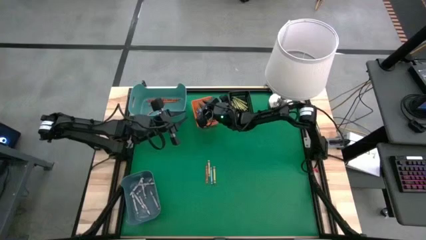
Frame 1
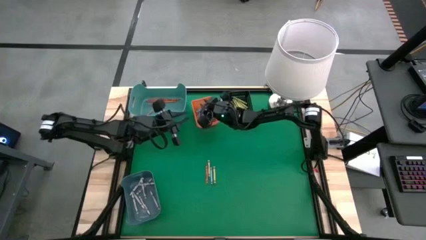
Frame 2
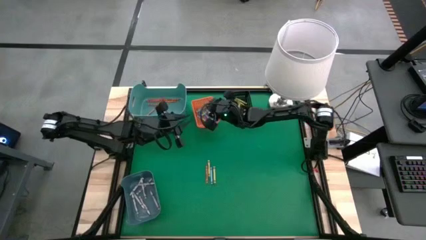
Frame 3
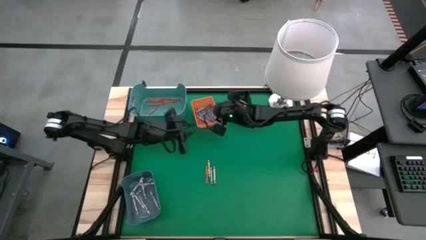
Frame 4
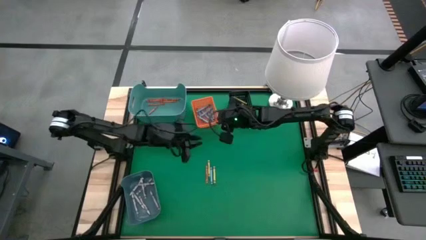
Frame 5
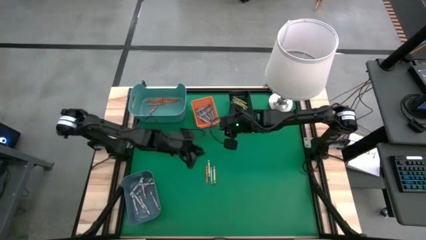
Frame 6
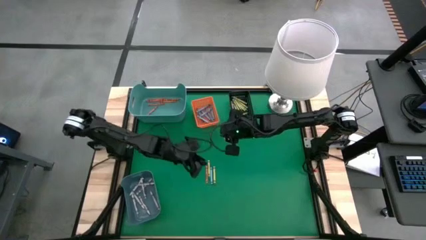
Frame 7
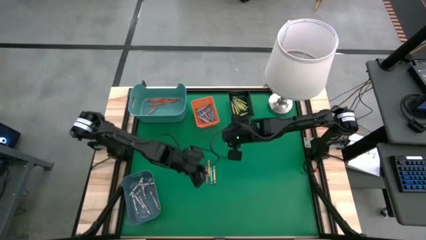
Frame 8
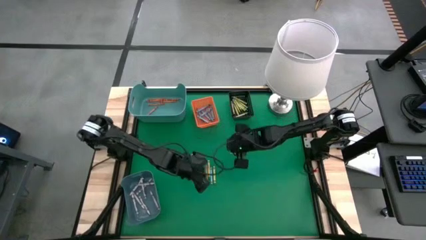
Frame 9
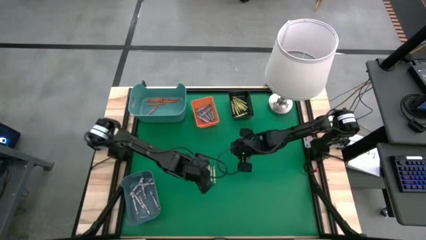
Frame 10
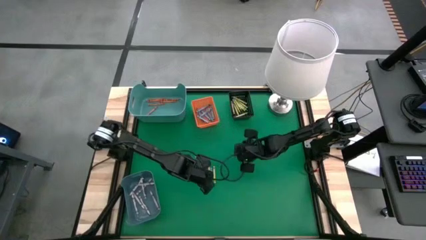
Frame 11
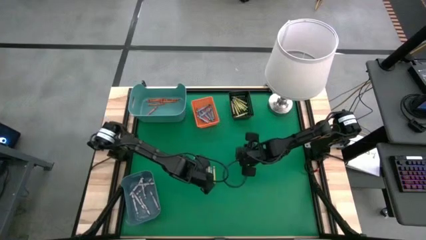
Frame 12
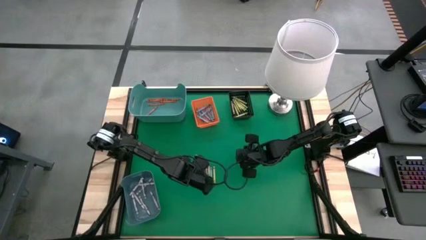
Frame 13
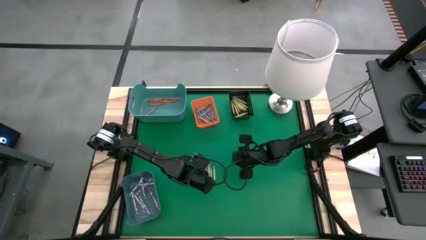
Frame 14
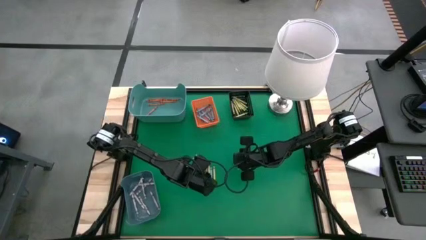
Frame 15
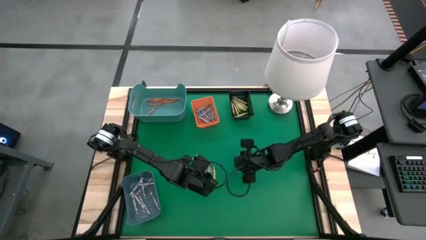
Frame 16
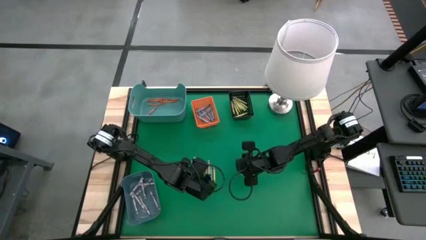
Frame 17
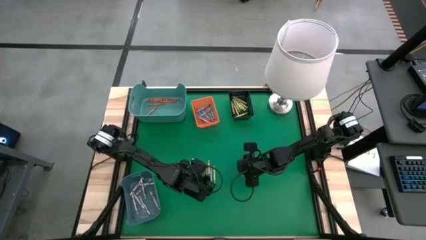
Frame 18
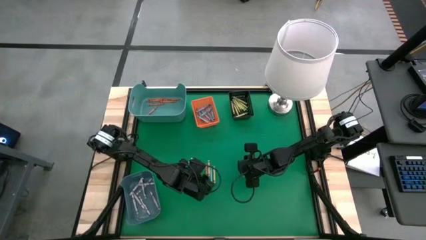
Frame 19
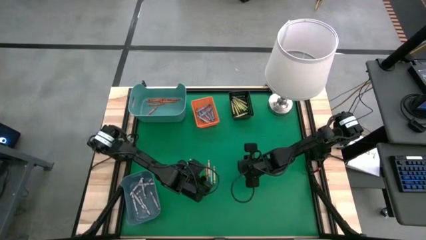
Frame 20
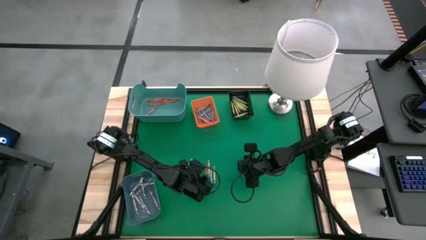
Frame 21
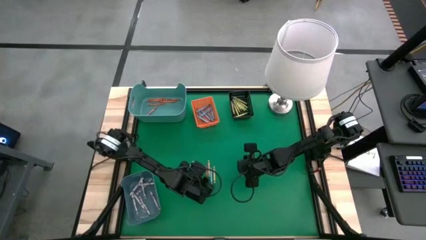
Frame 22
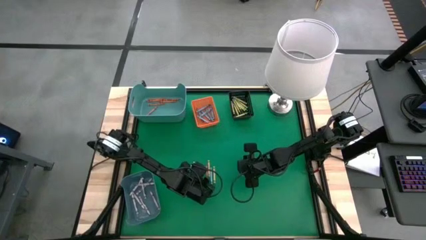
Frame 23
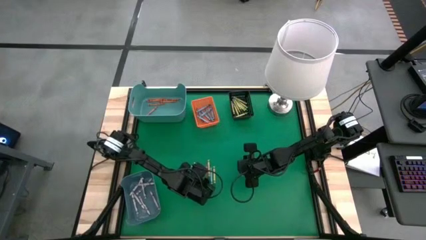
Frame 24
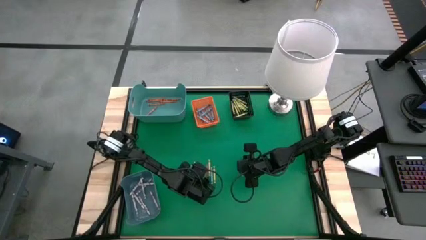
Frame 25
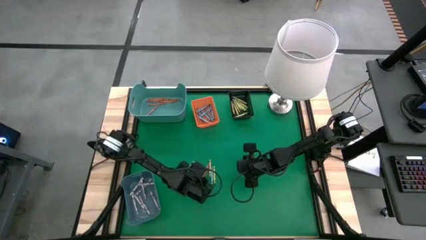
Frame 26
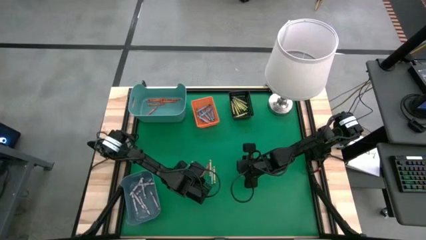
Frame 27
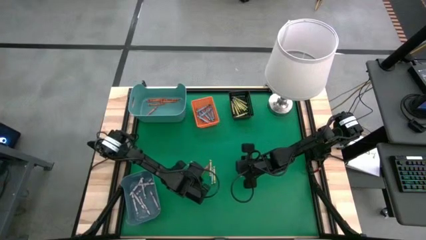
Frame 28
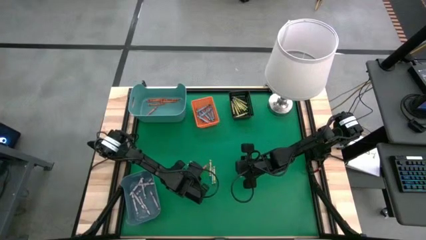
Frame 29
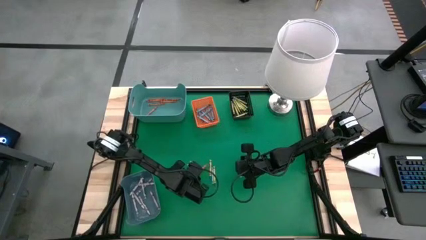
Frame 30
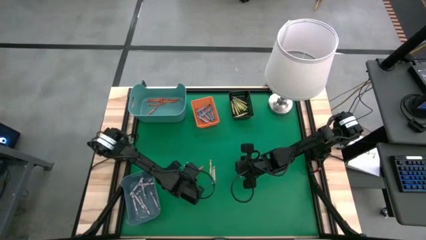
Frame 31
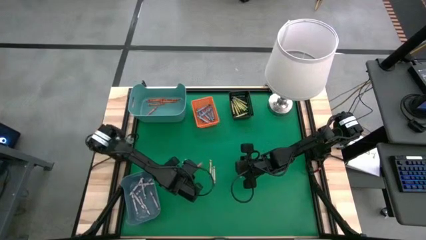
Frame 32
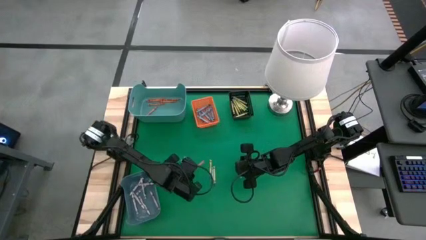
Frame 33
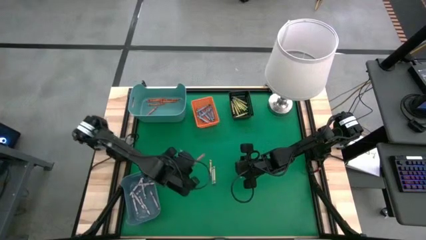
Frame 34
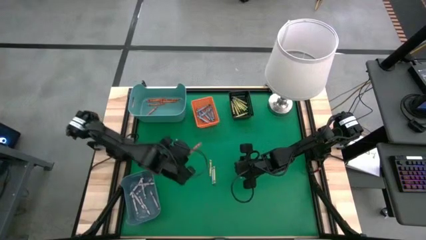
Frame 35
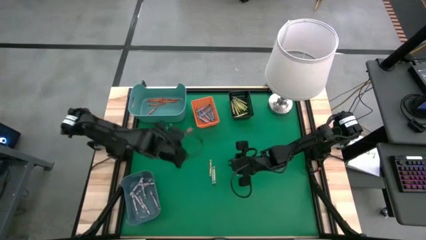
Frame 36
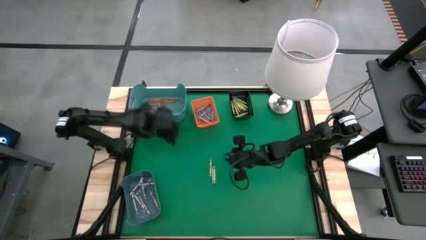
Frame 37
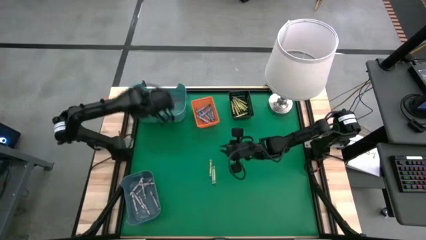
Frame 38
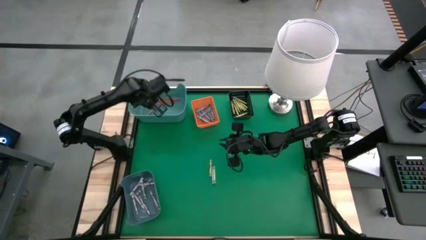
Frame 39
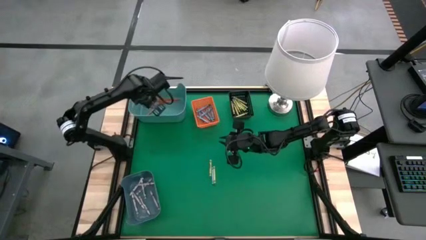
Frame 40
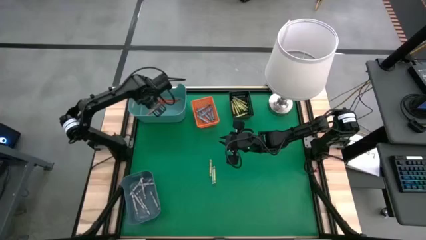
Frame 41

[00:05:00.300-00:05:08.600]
Task: Sort crayons
Put the orange crayon into the green bin

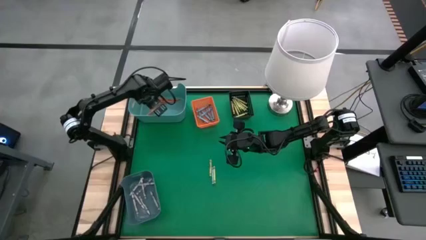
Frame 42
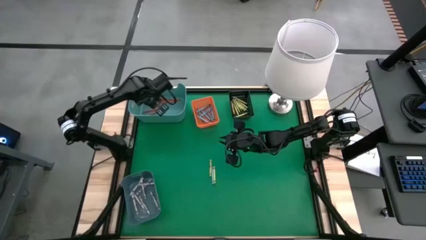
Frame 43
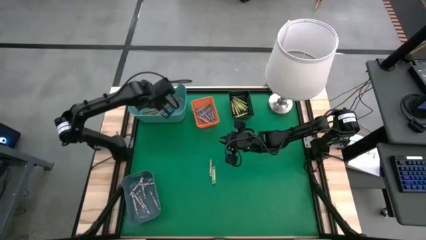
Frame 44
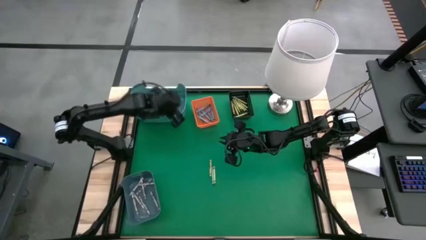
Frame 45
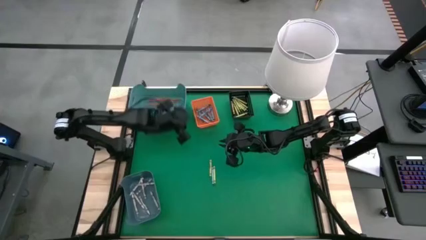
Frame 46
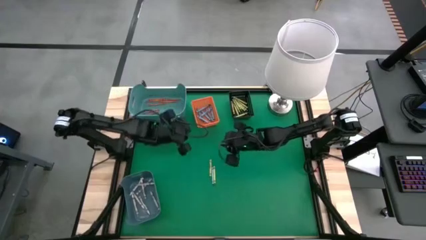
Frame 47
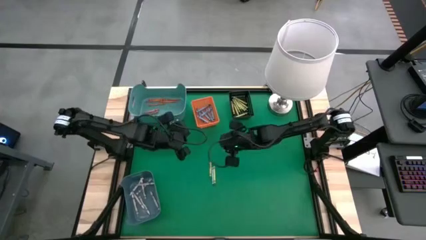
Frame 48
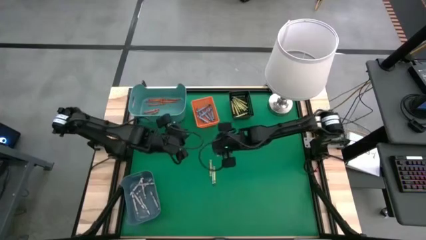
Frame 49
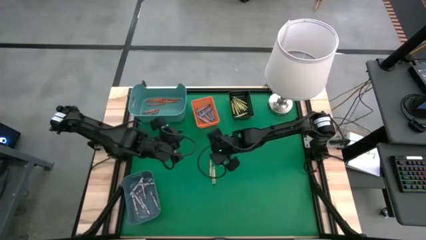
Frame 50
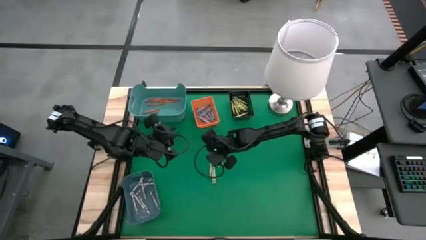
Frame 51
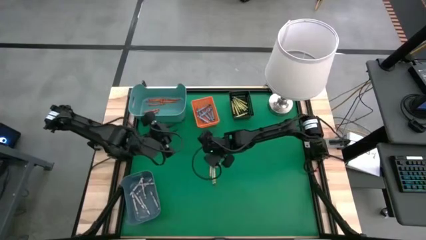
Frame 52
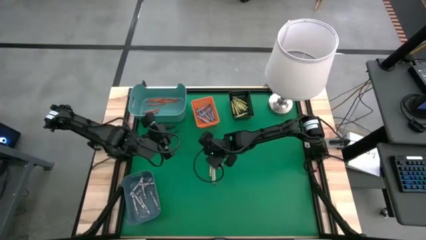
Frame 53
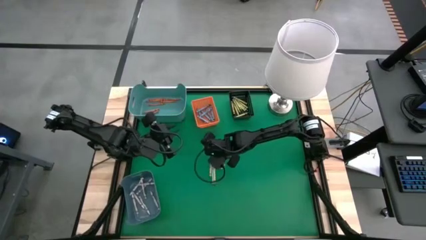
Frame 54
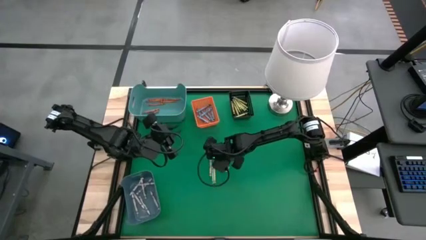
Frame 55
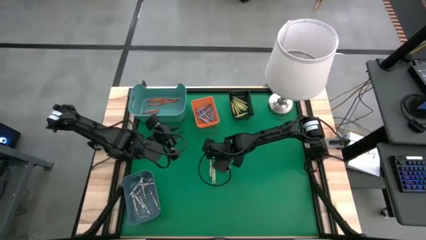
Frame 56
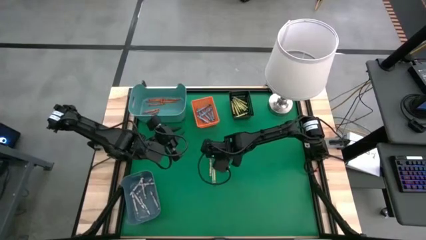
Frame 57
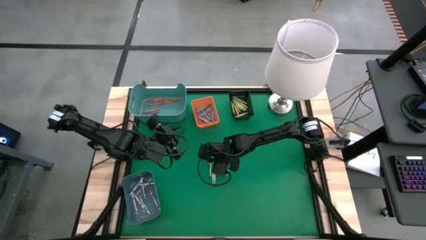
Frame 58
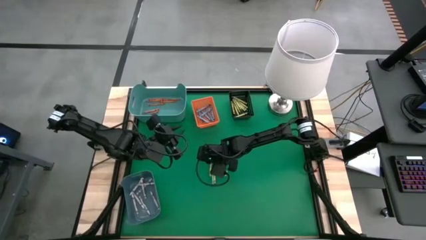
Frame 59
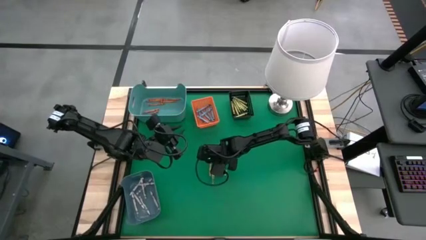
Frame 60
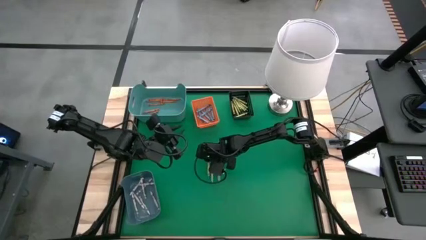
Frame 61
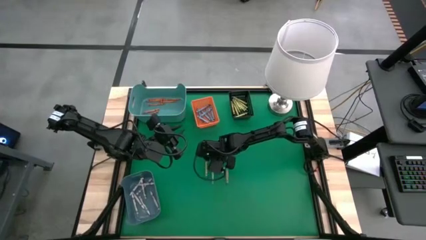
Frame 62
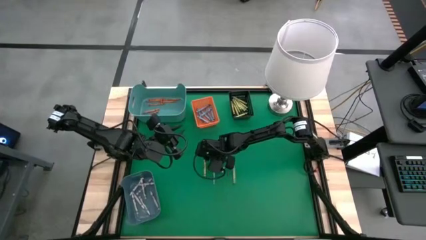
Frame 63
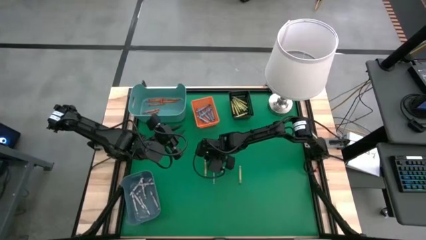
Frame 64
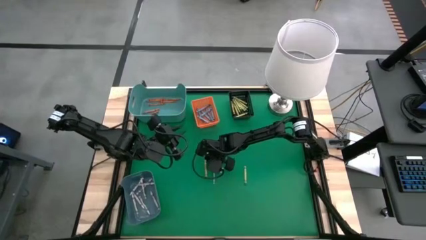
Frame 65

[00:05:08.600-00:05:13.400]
Put the green crayon into the black bin

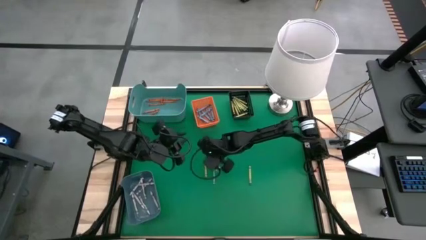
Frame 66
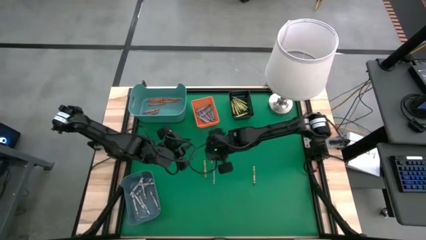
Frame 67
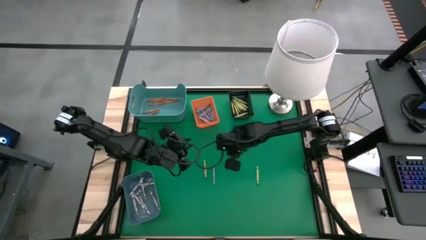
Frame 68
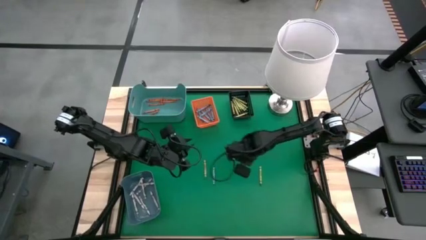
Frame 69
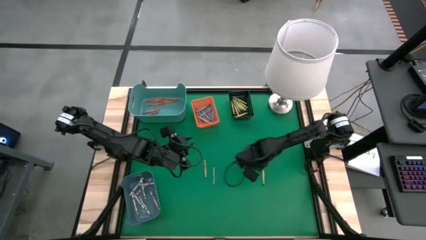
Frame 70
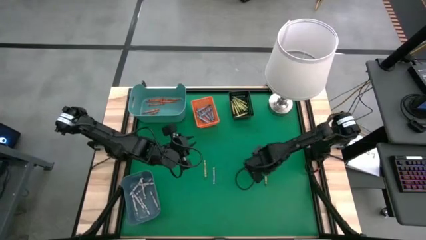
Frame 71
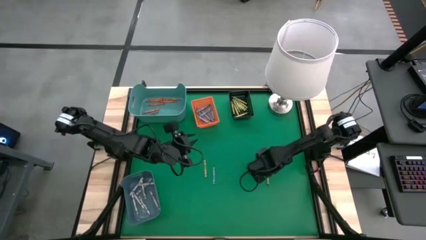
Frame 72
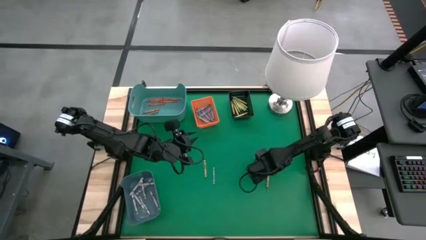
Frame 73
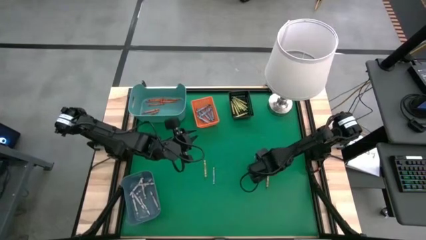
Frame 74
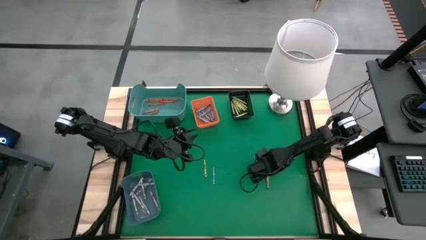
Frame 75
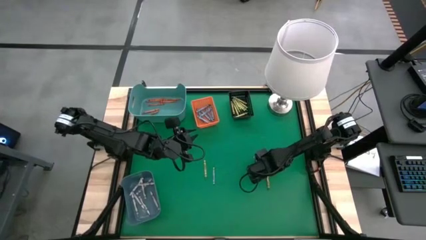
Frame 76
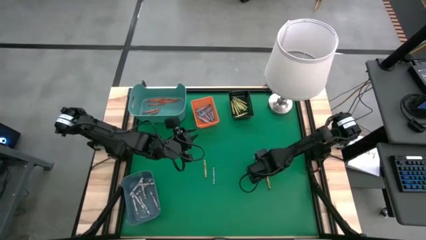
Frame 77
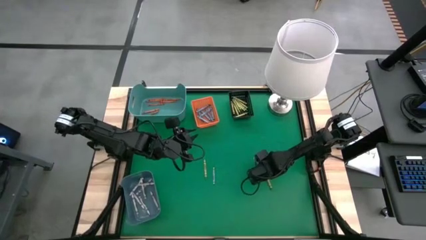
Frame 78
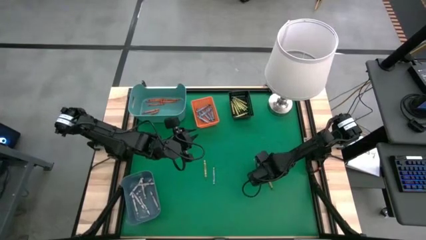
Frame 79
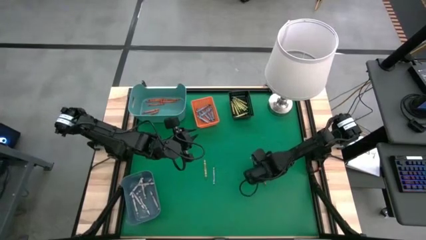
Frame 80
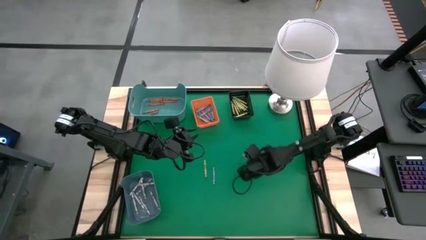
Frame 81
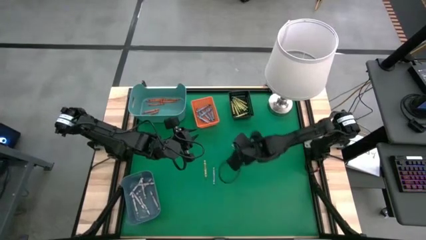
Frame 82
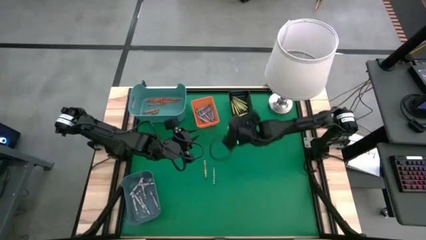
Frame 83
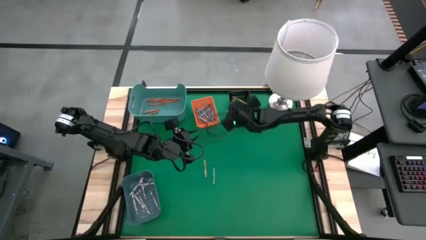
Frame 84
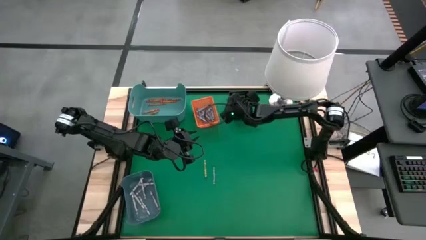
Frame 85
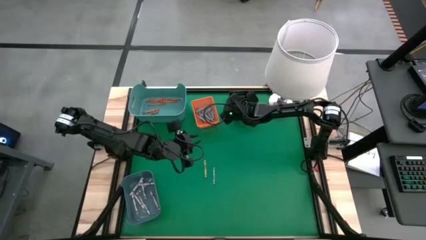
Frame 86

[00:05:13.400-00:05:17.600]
Put the green crayon into the black bin
